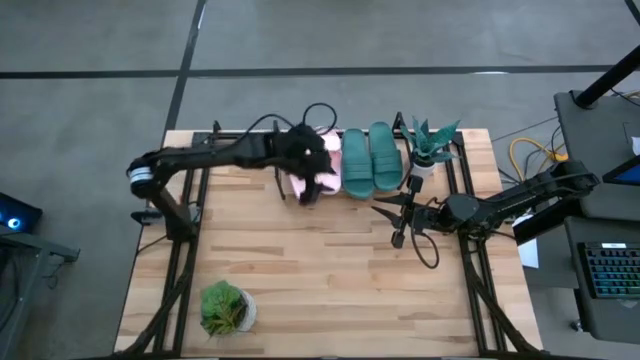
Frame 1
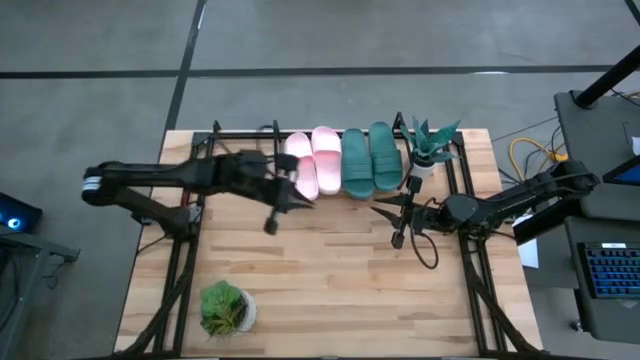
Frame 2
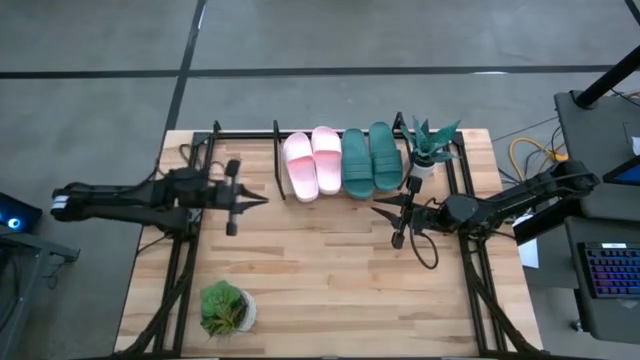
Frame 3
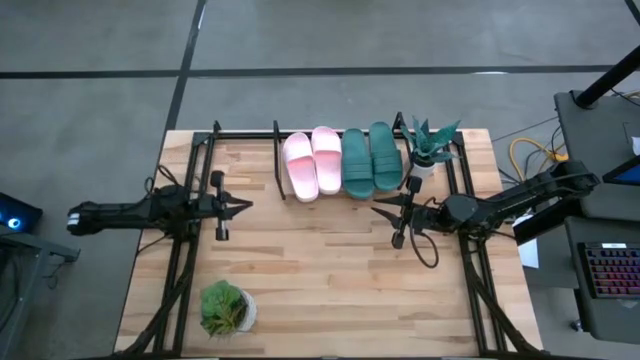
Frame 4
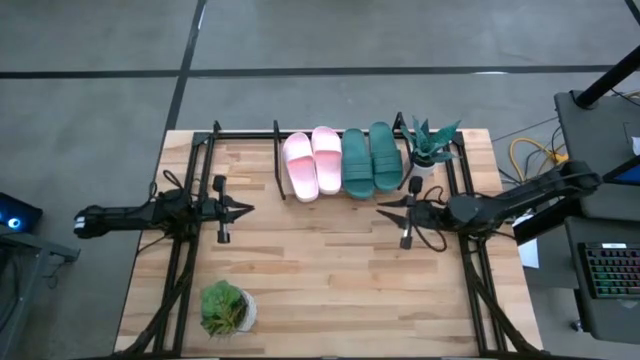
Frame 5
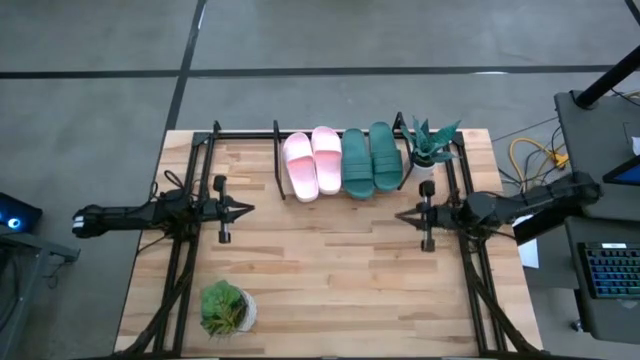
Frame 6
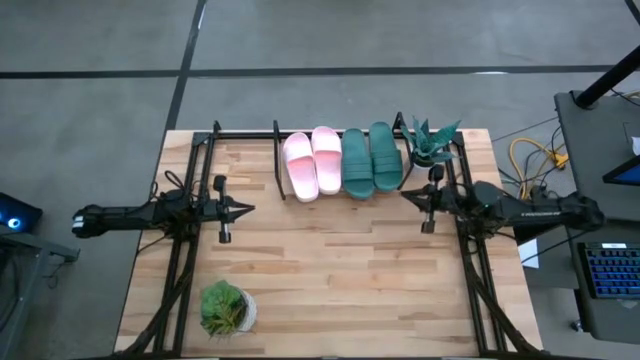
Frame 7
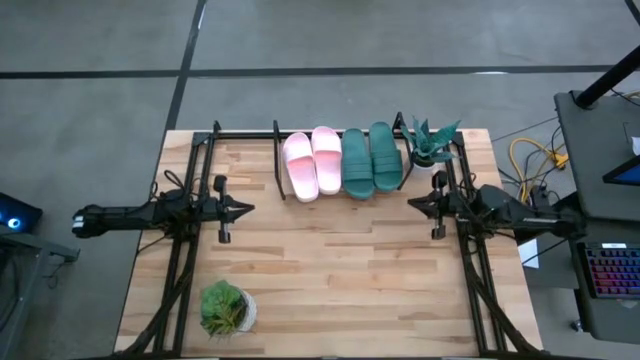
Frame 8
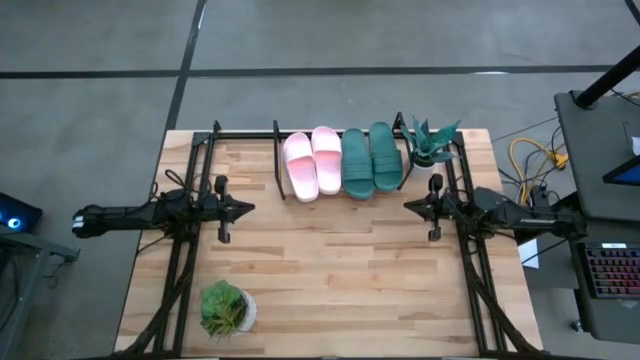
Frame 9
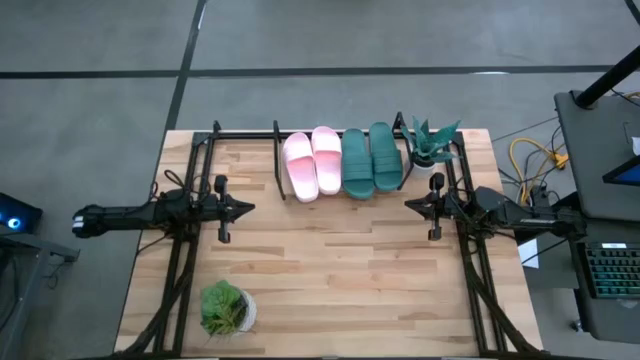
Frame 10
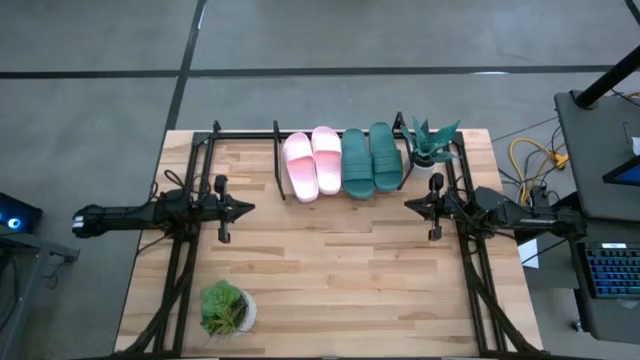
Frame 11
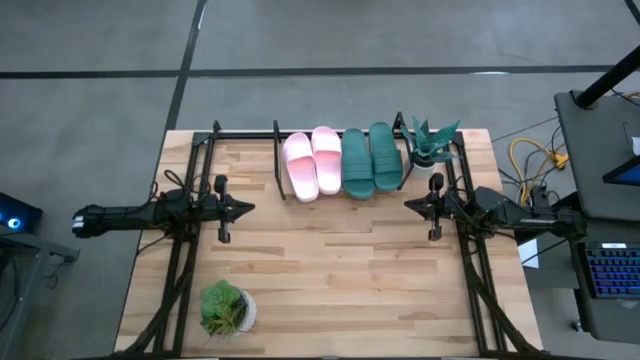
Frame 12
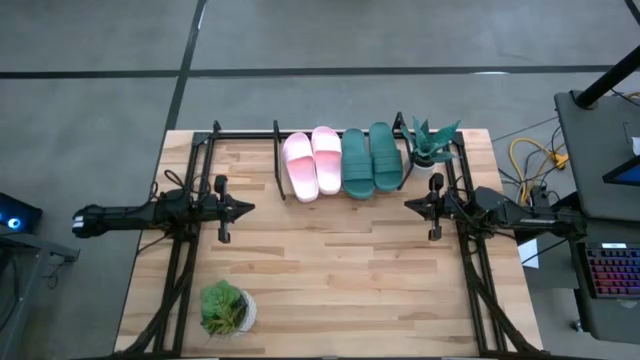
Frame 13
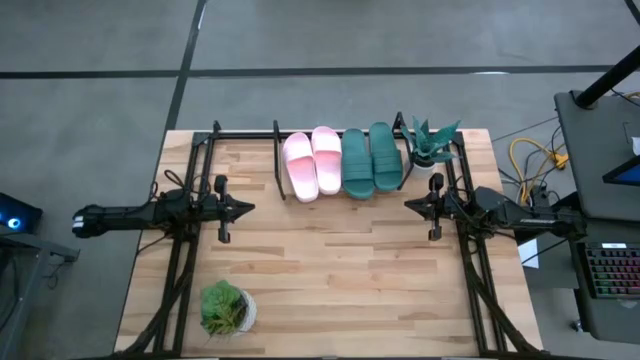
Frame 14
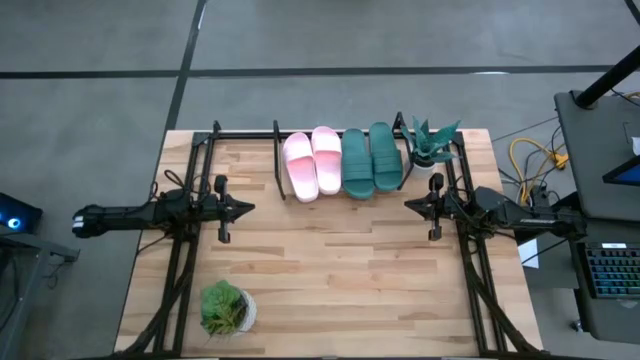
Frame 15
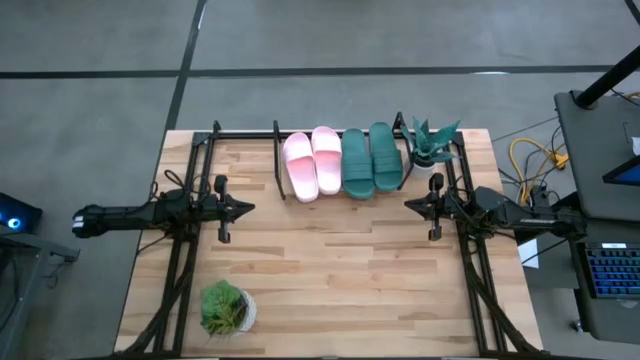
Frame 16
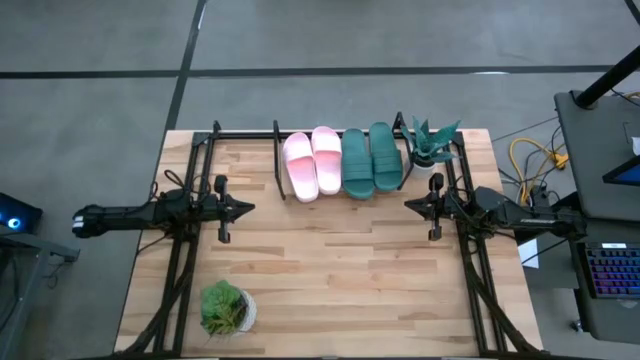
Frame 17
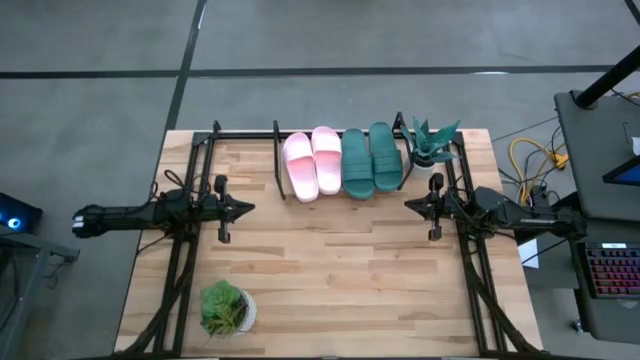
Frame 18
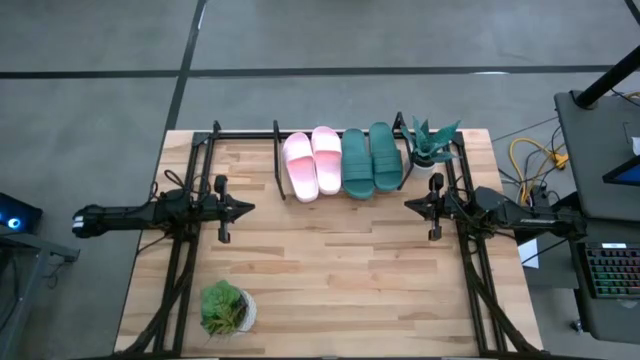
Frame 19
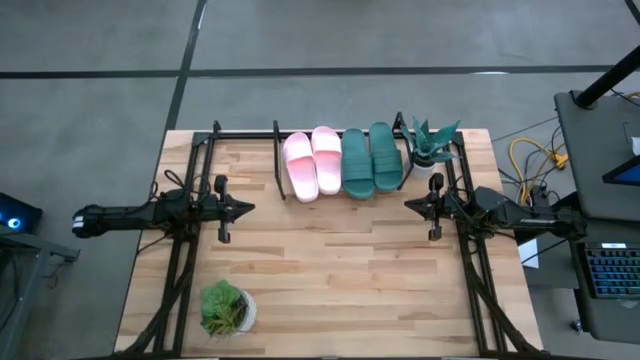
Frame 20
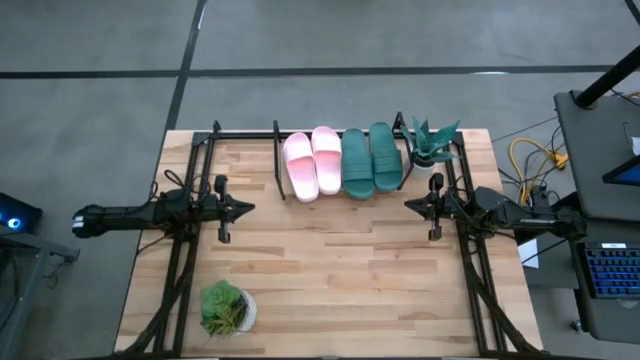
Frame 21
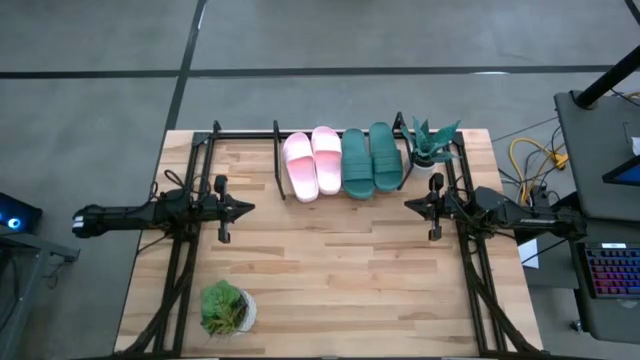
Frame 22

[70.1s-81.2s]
Task: Pick and place slides into the shelf
Return to Home Position

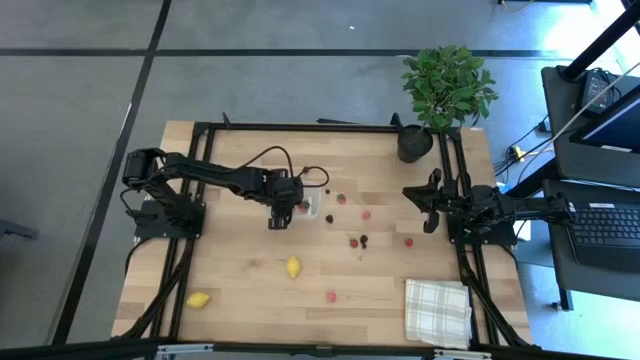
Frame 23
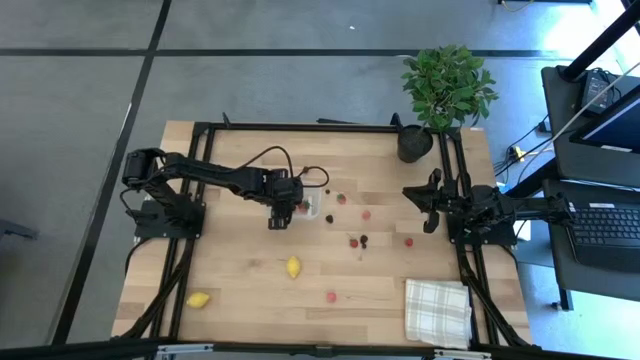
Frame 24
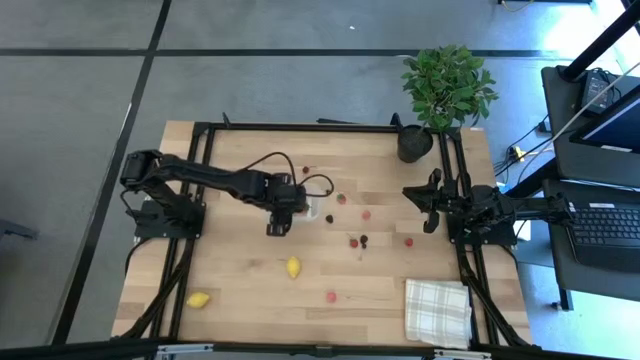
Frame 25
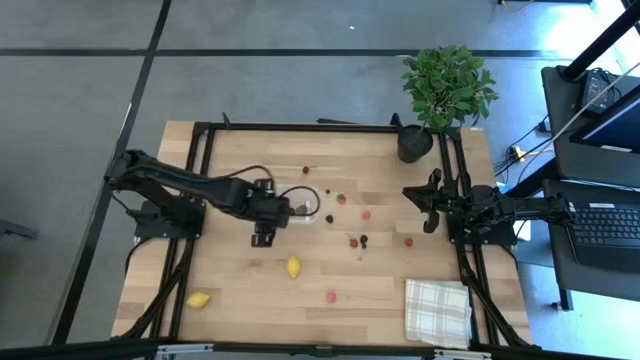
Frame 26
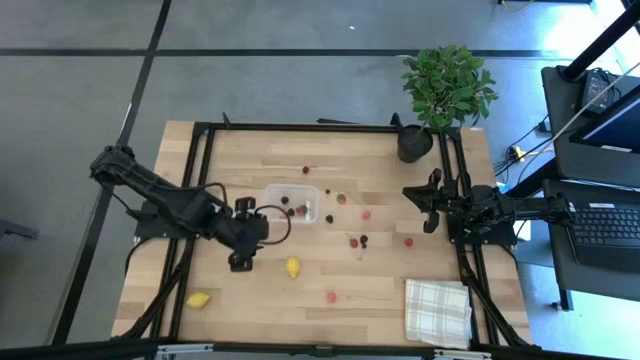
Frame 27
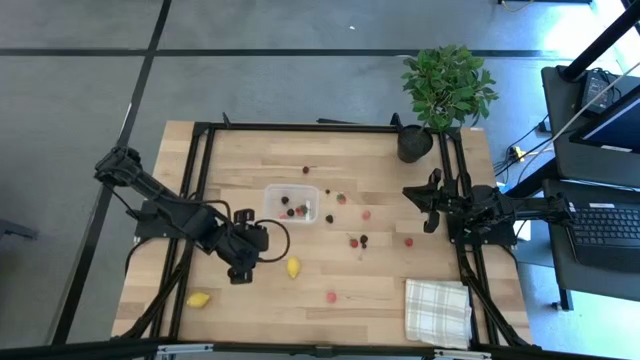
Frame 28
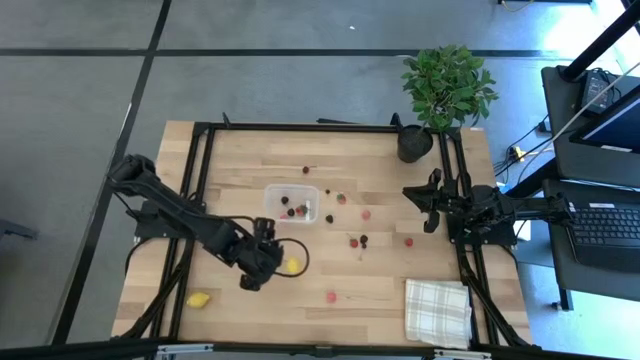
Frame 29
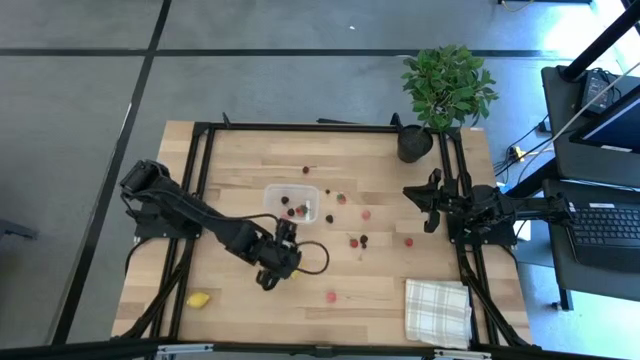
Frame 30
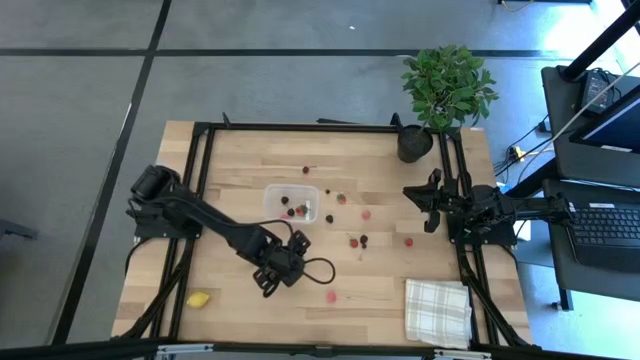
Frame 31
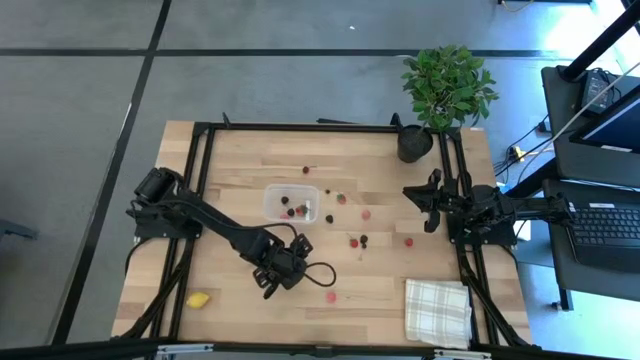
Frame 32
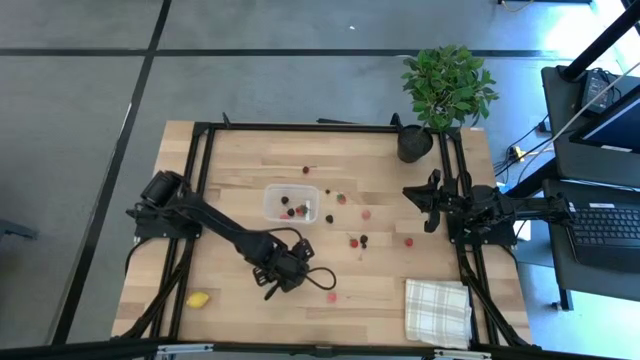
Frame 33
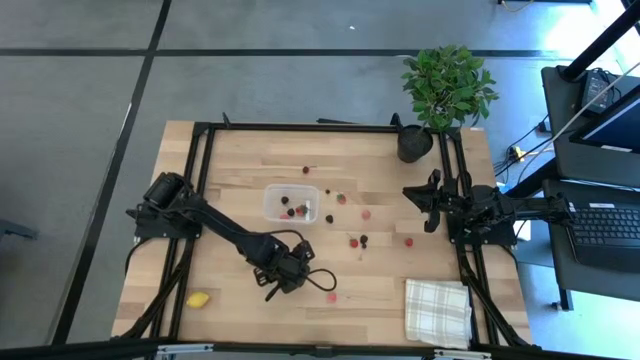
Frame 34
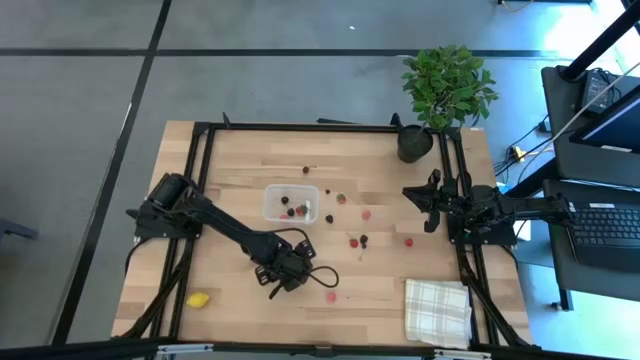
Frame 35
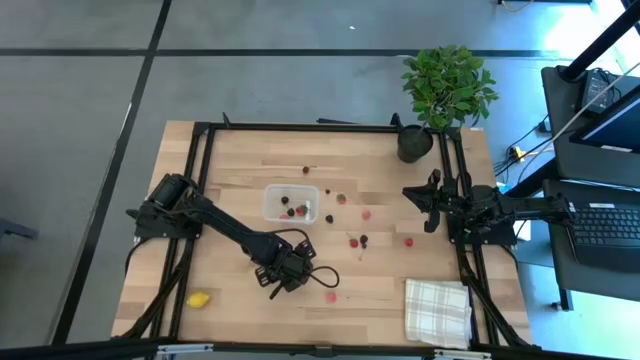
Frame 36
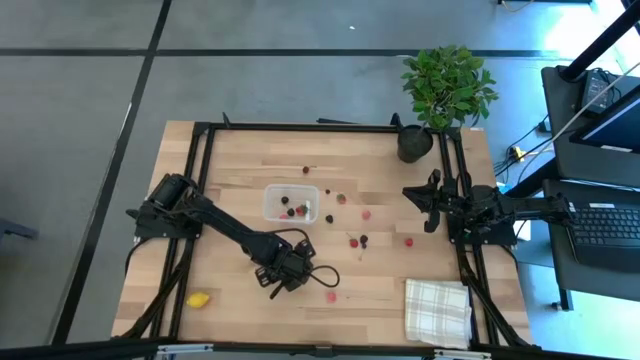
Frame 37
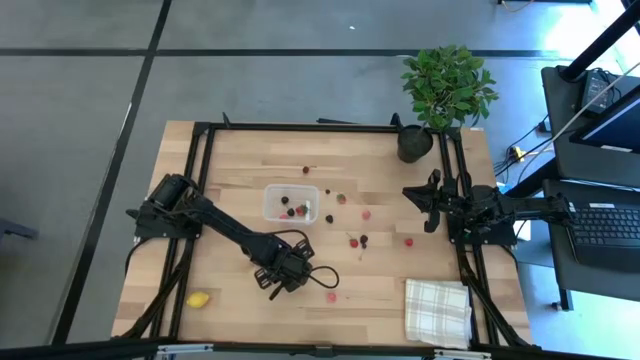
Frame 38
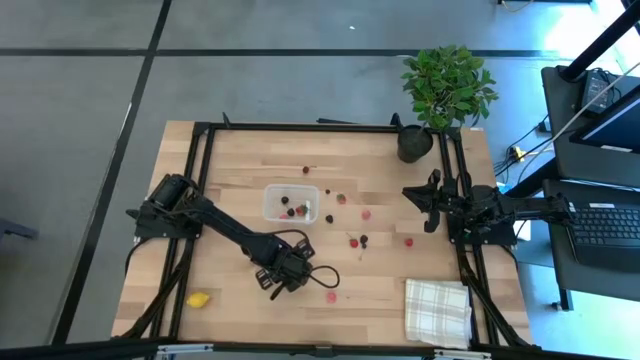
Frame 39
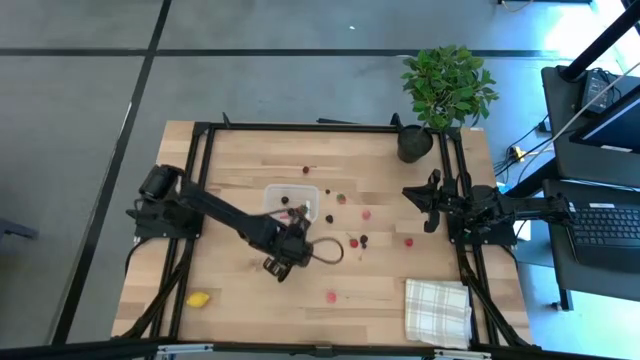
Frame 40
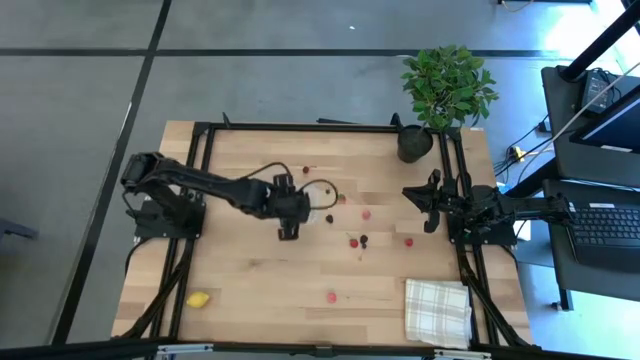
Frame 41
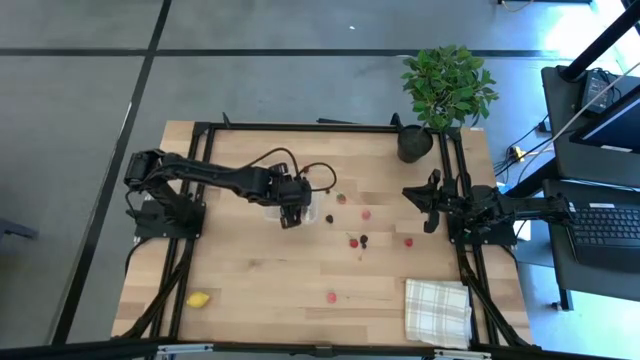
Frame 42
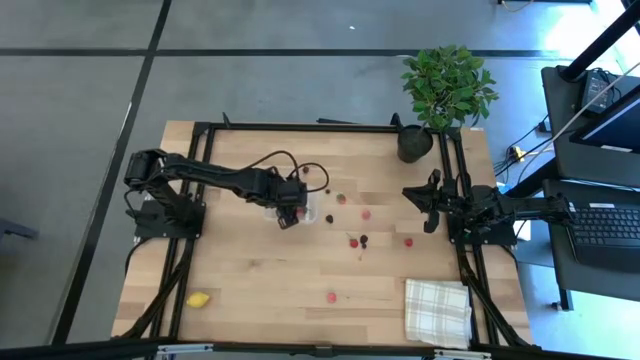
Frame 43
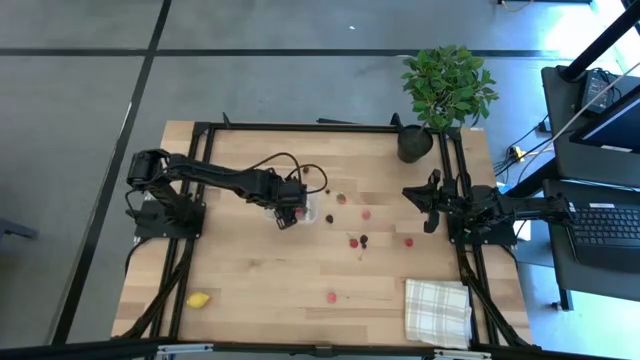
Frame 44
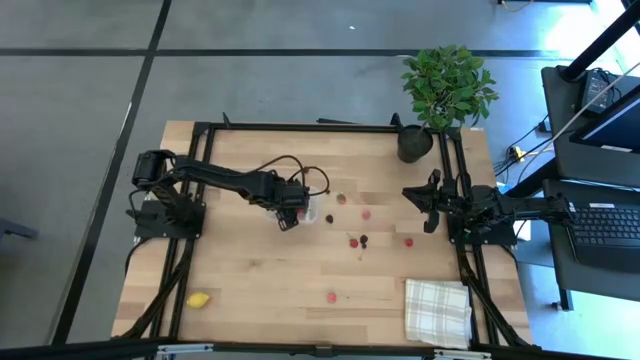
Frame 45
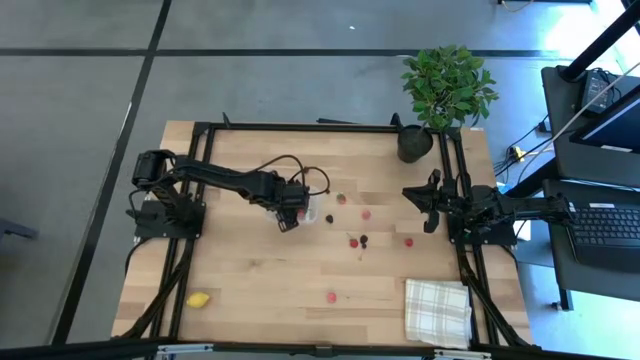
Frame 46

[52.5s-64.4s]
Task: Pick and placing Produce into tupperware
Put the top lemon into the transparent bin
